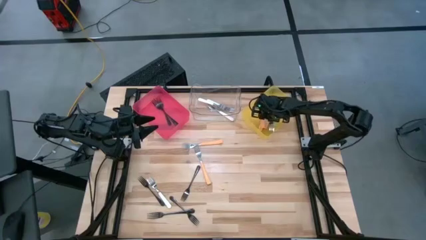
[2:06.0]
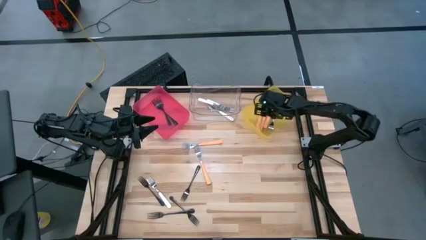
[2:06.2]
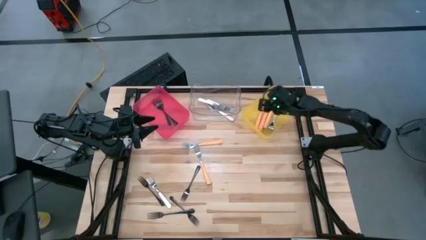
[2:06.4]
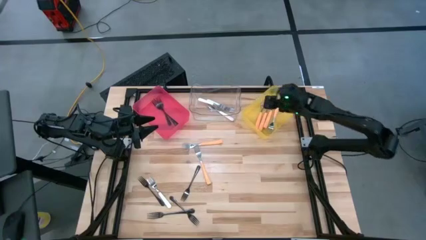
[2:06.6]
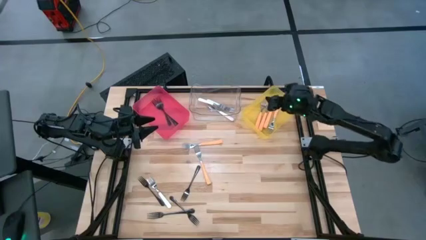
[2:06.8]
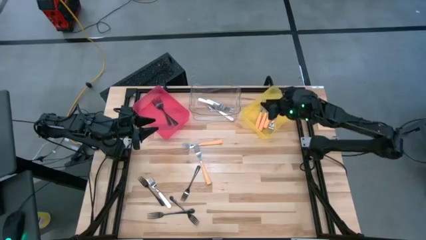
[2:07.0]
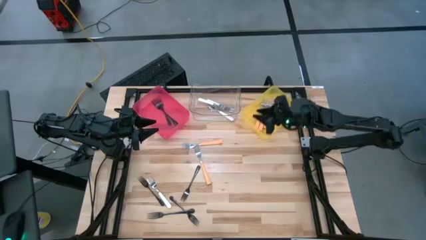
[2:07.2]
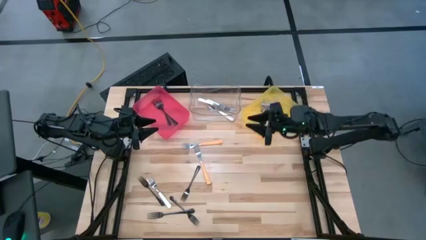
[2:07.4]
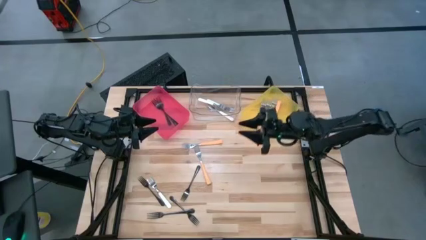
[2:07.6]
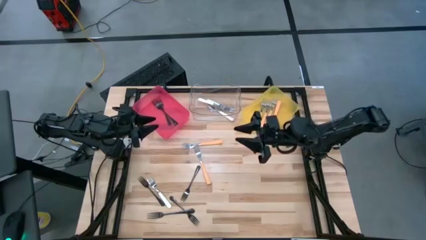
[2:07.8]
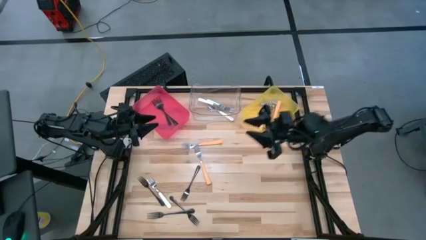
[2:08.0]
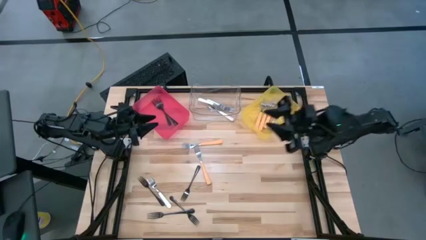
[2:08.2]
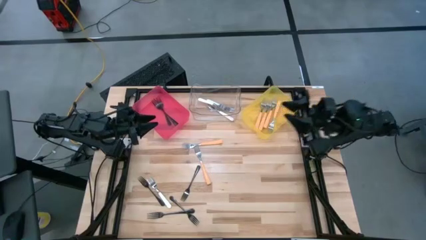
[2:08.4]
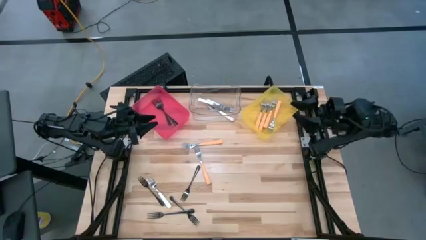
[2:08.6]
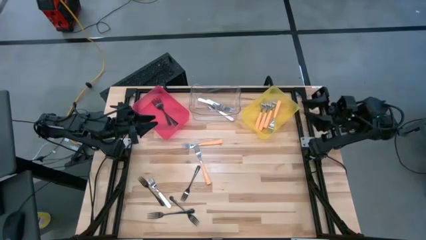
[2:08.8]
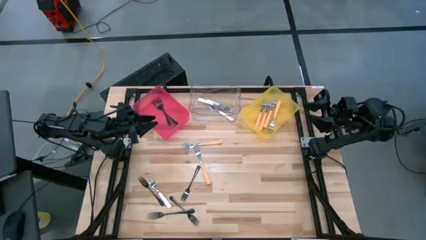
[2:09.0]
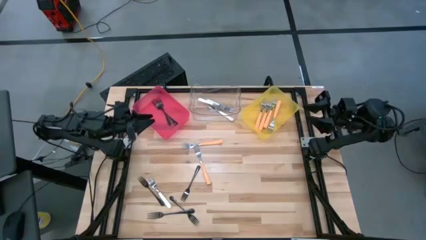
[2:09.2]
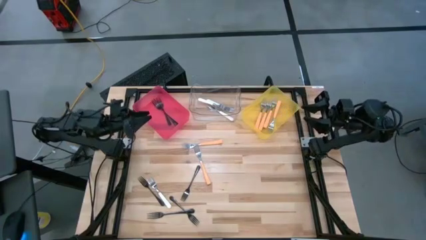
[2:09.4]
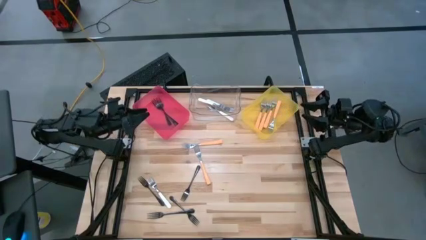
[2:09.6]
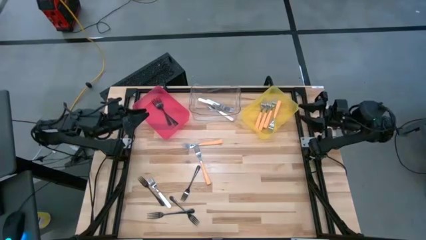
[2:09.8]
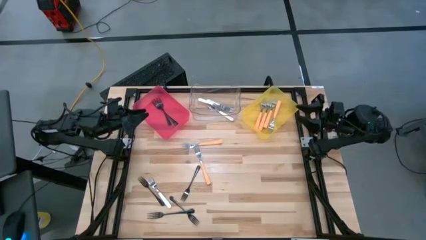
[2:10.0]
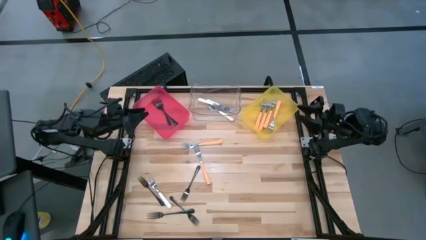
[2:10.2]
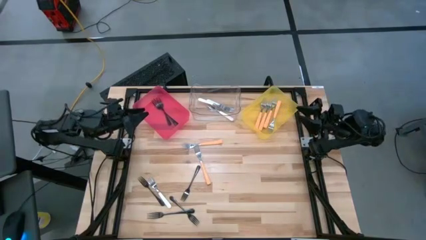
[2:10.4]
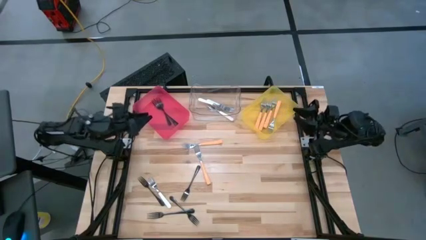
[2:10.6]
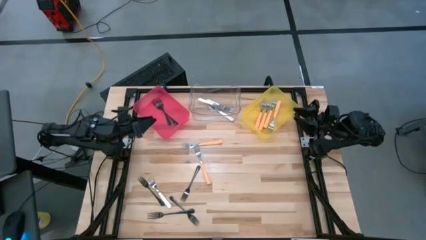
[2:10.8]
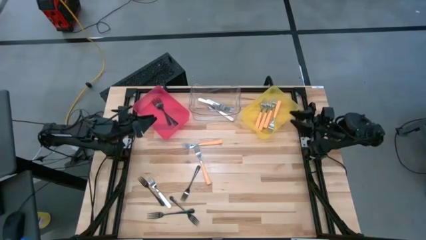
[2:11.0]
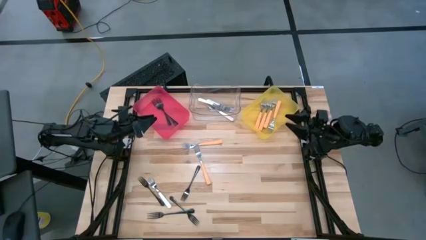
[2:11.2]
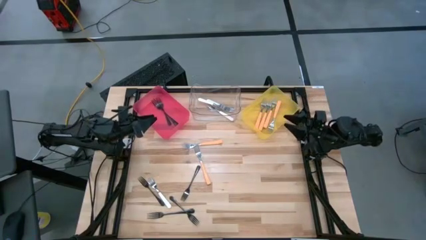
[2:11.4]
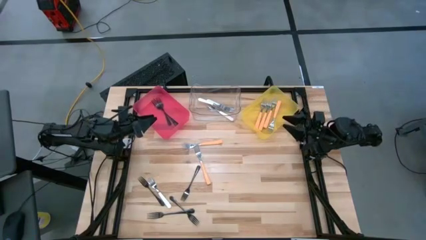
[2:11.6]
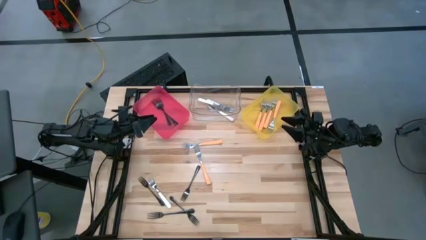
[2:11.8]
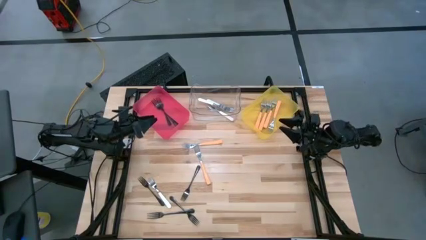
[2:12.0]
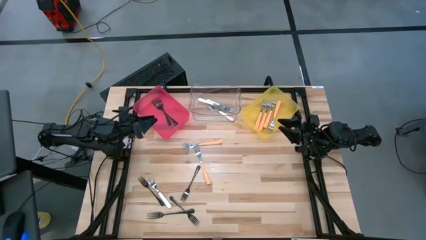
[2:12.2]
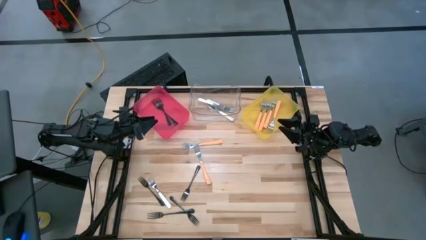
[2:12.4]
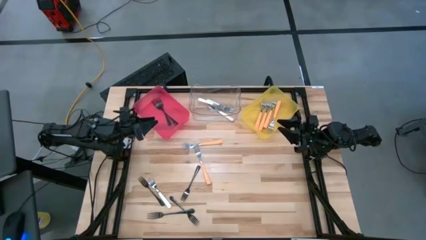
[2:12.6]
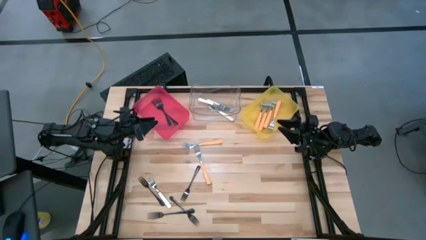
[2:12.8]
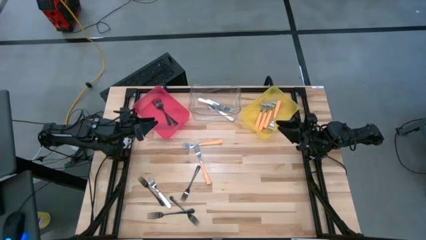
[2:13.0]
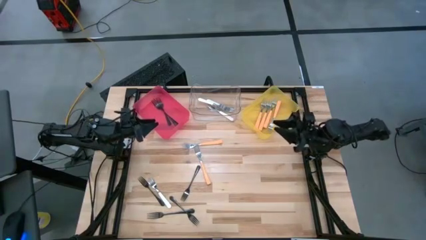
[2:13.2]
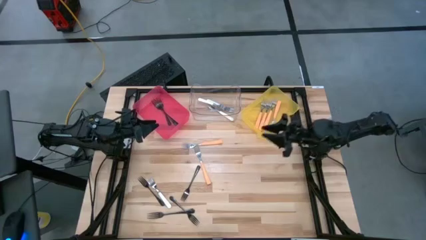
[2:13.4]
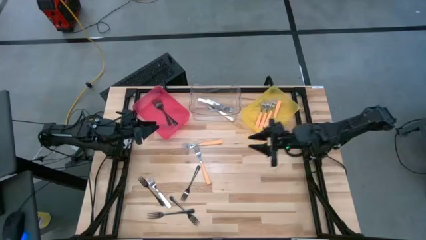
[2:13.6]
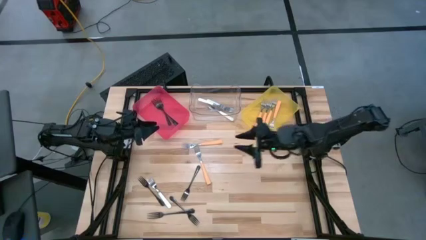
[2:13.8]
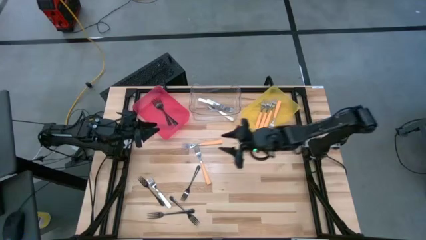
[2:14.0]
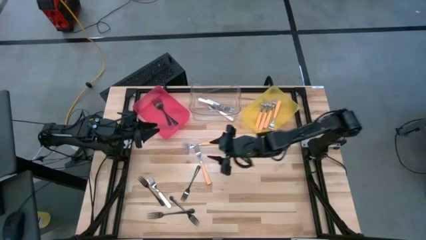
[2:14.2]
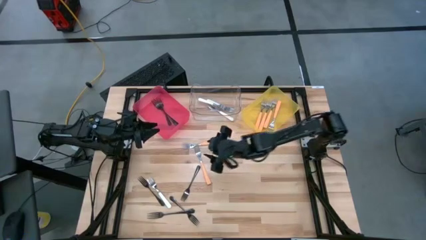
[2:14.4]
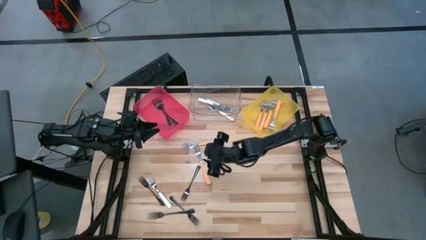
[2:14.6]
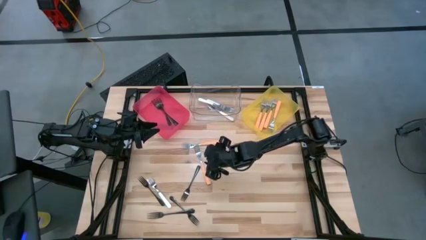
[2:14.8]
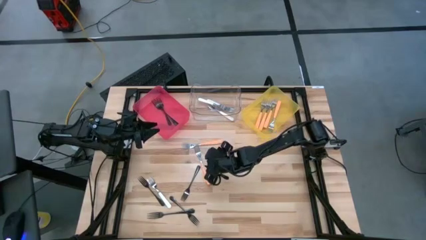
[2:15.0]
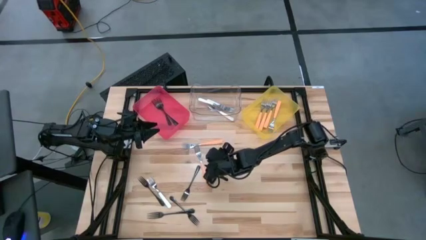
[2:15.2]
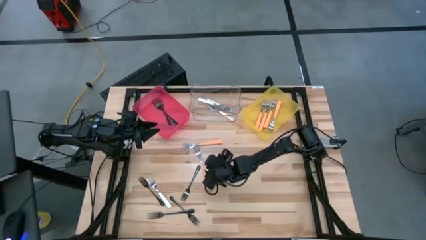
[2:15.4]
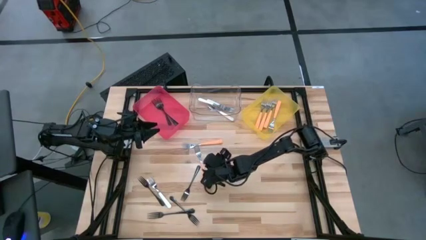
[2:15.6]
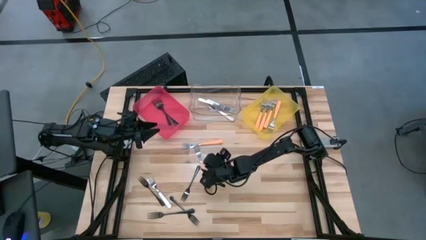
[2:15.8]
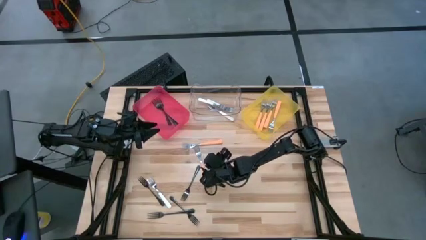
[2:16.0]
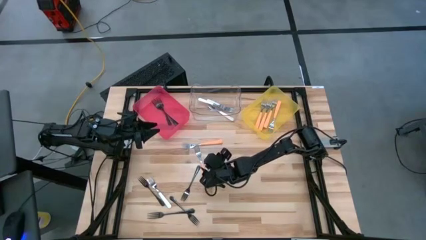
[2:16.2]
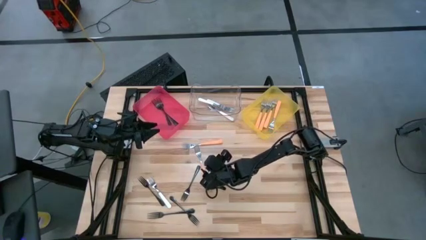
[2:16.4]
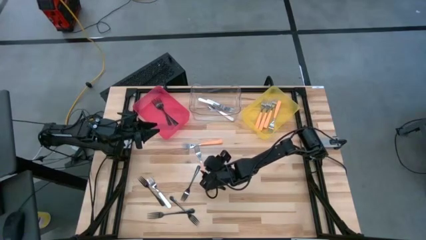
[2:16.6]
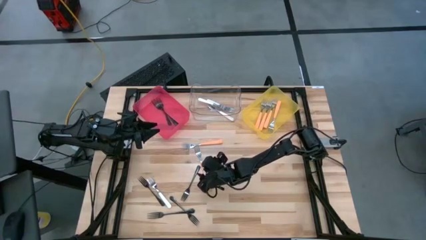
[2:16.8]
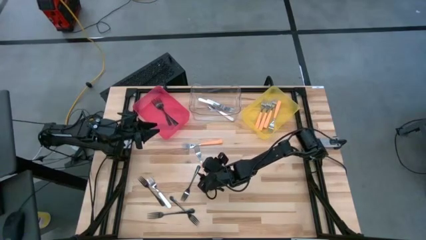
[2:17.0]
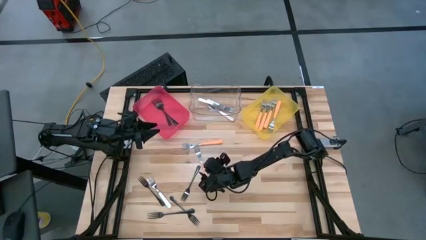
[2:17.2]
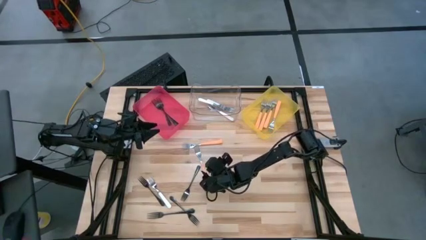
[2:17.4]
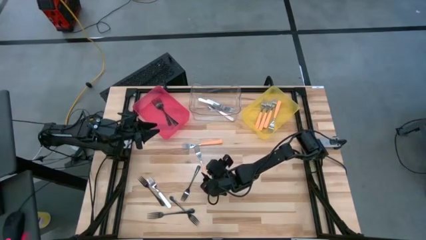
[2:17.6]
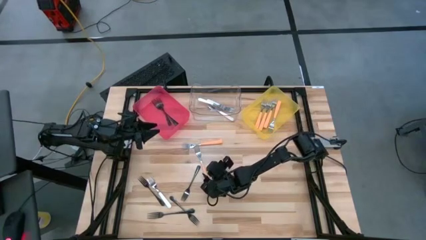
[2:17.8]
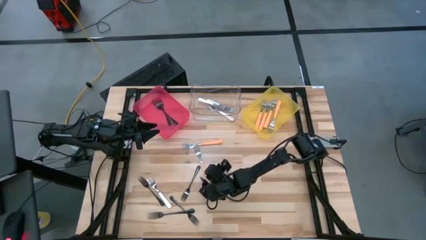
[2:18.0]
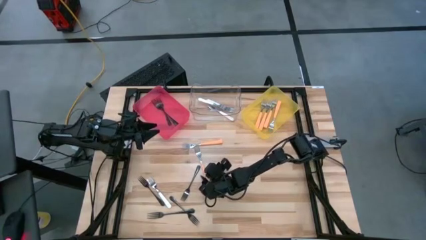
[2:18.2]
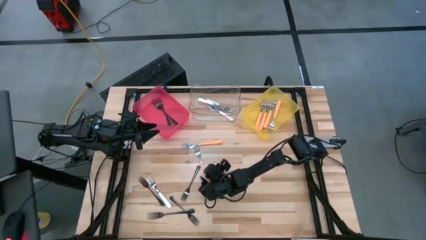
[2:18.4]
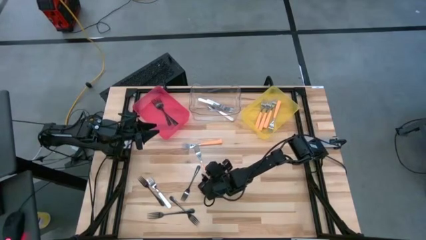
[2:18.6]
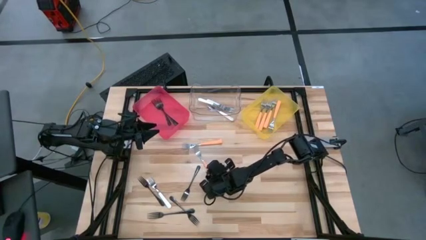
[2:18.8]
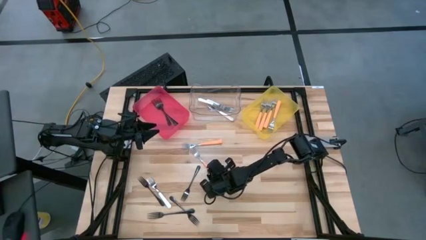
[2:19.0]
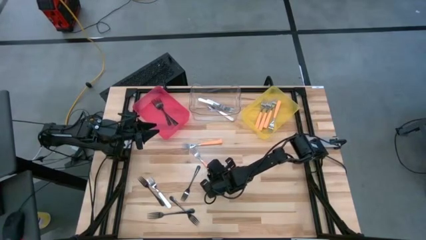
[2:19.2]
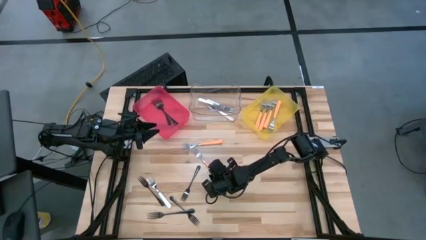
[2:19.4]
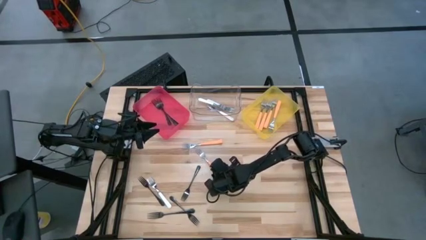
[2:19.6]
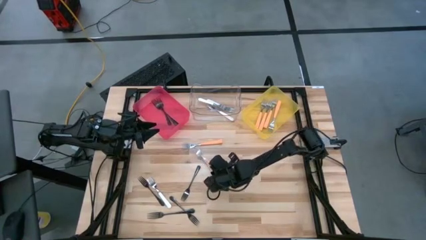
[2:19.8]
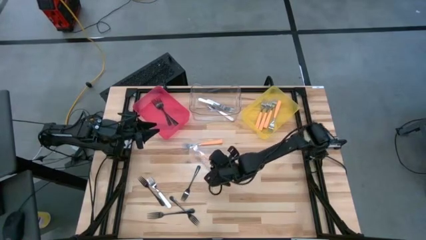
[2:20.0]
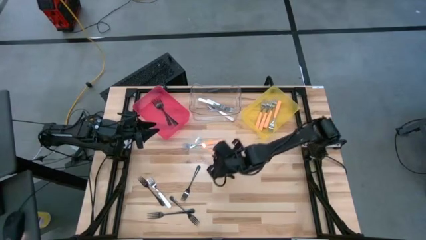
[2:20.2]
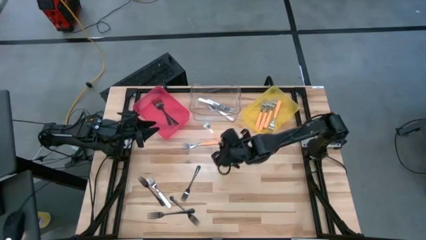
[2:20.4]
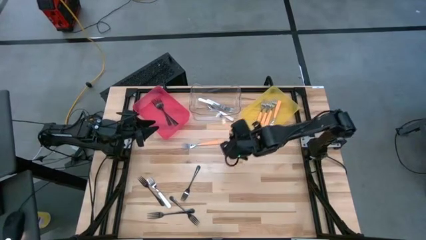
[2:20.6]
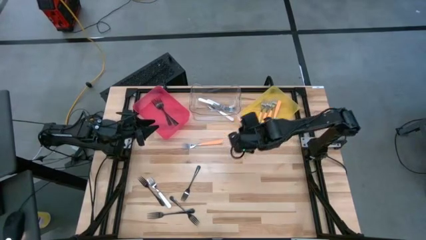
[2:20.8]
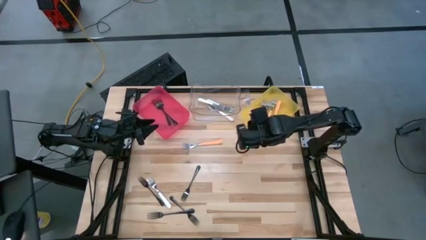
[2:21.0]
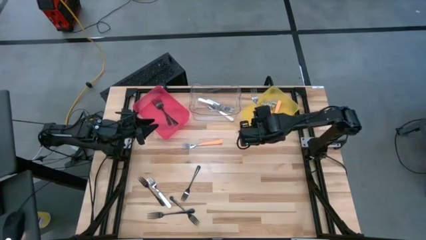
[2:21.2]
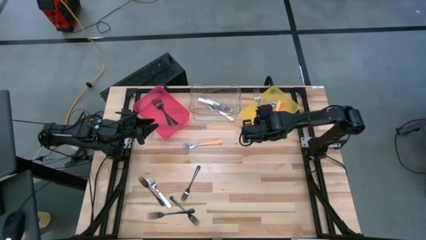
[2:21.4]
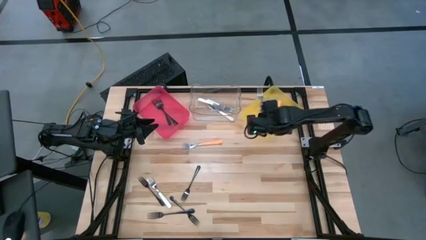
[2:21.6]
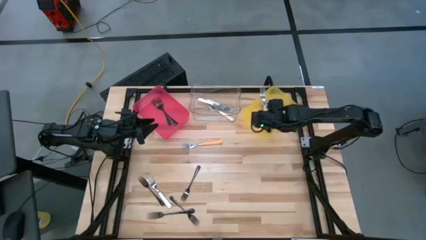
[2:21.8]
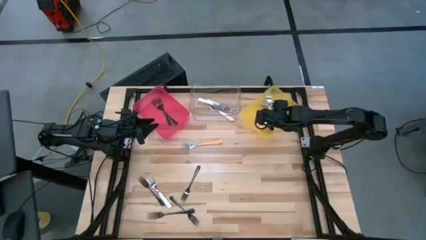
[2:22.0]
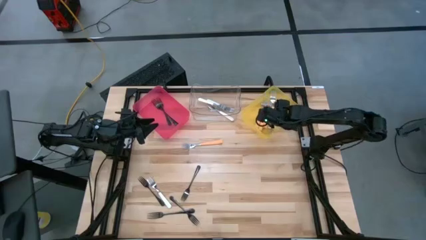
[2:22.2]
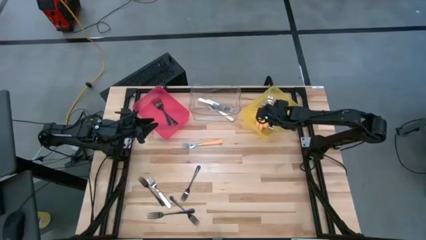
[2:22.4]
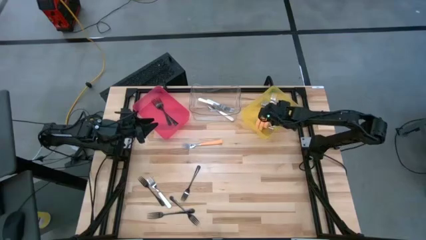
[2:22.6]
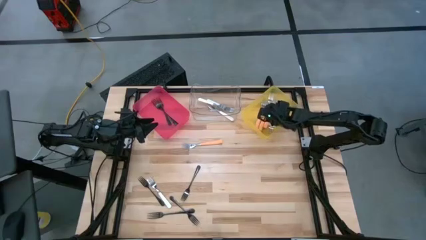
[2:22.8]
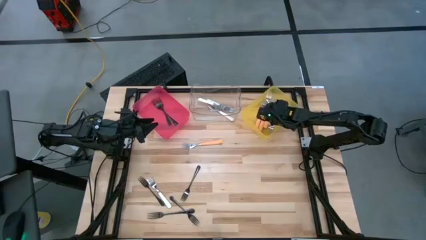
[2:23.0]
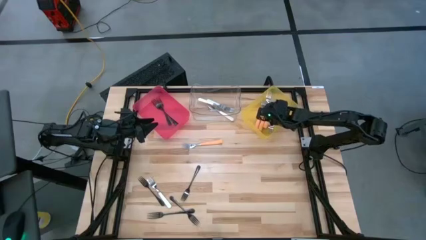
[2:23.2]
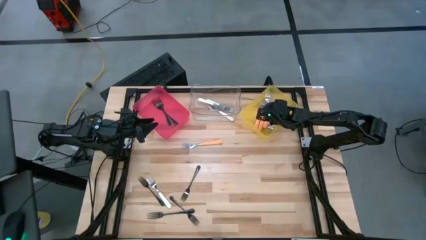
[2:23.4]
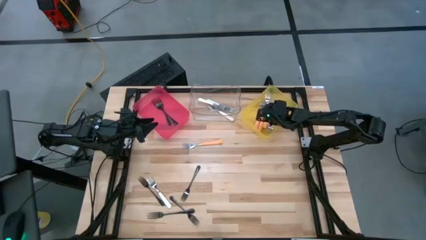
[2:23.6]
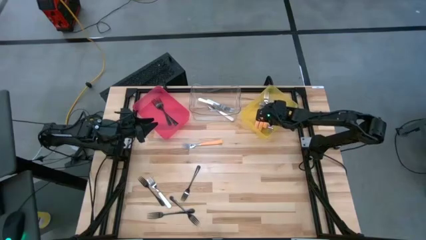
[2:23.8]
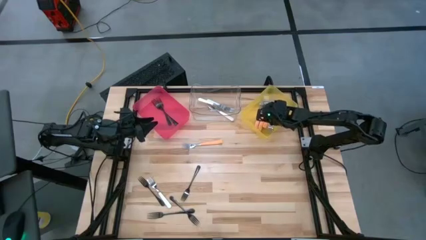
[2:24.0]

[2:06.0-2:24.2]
Task: Sort silverware by color (type)
Put the orange fork into the yellow bin
